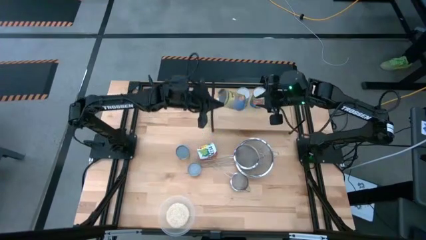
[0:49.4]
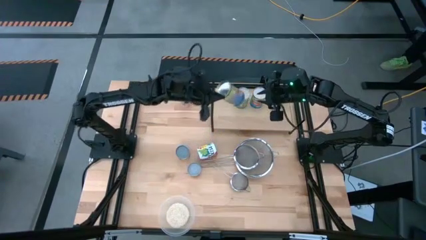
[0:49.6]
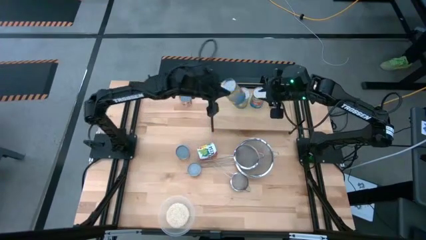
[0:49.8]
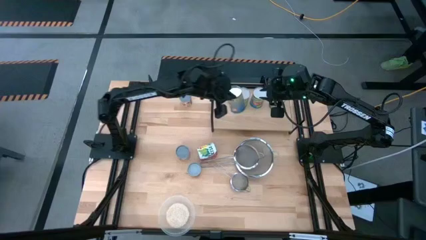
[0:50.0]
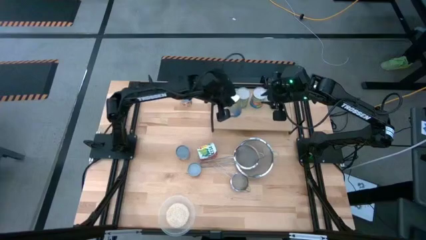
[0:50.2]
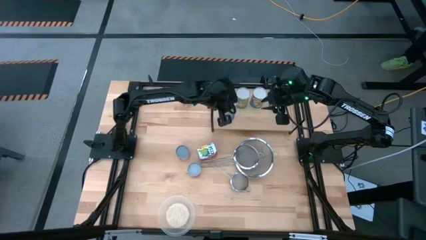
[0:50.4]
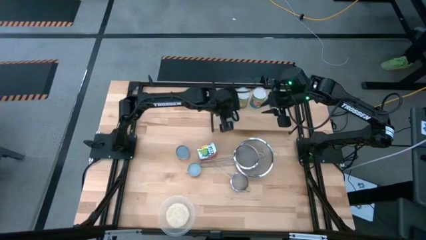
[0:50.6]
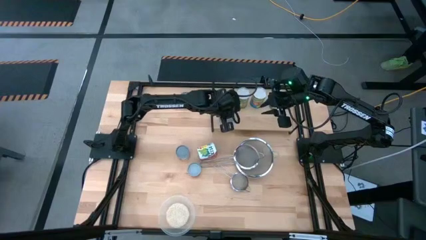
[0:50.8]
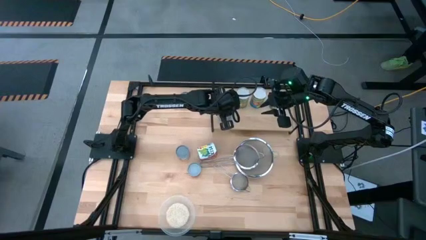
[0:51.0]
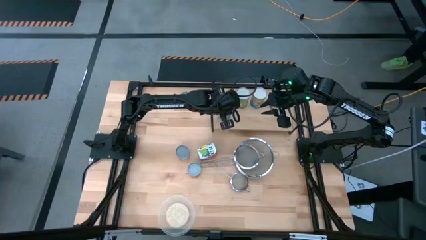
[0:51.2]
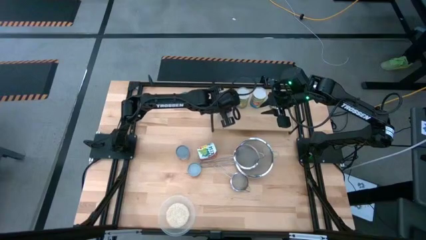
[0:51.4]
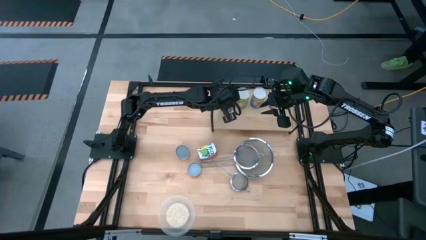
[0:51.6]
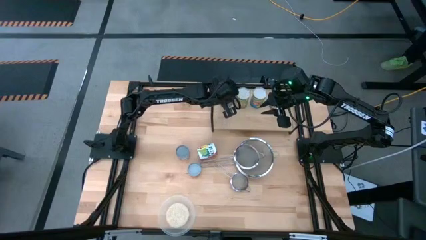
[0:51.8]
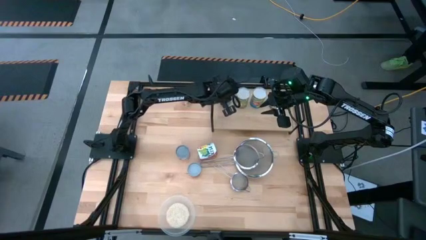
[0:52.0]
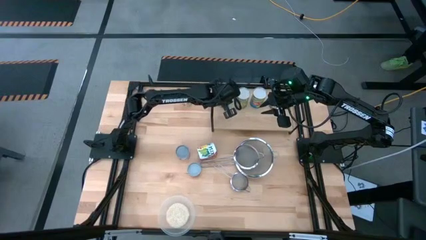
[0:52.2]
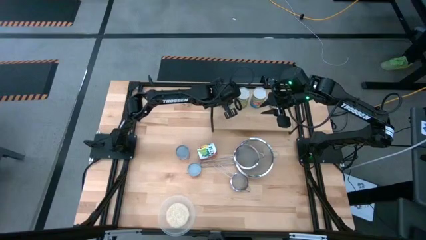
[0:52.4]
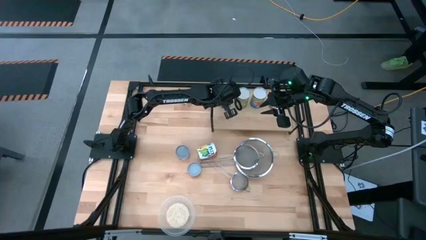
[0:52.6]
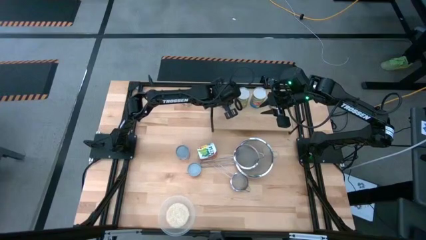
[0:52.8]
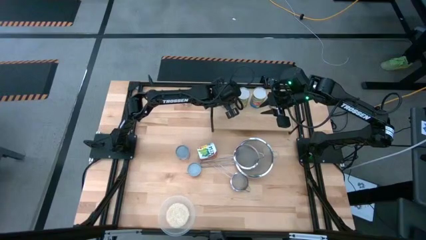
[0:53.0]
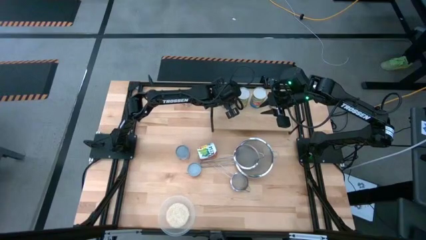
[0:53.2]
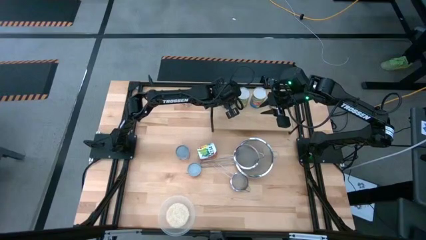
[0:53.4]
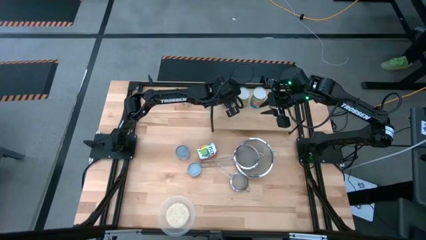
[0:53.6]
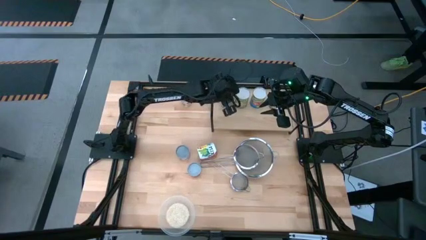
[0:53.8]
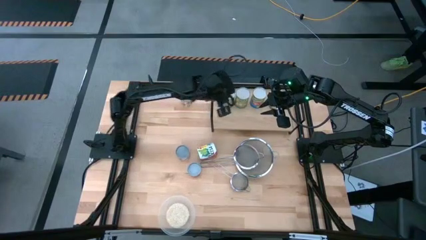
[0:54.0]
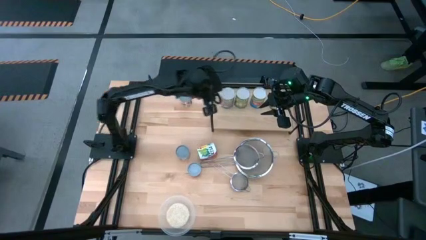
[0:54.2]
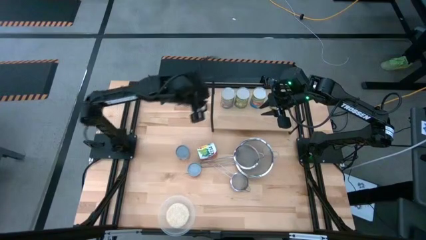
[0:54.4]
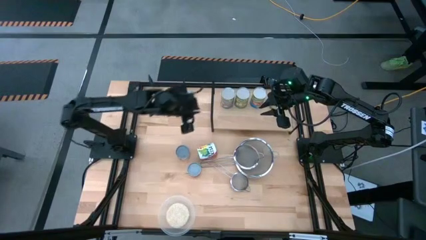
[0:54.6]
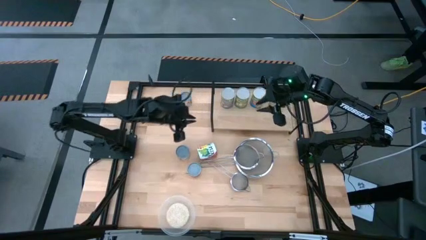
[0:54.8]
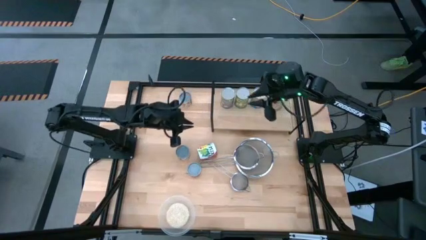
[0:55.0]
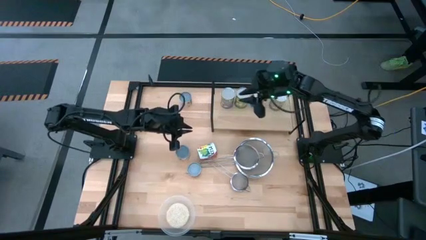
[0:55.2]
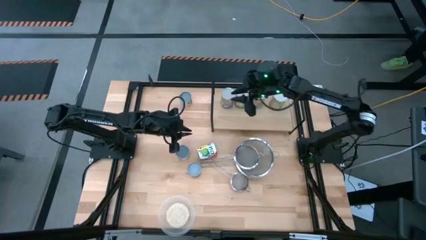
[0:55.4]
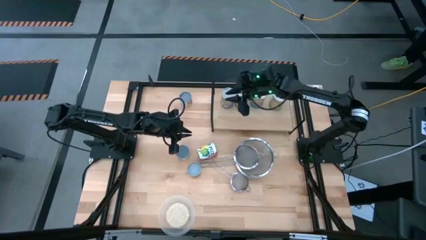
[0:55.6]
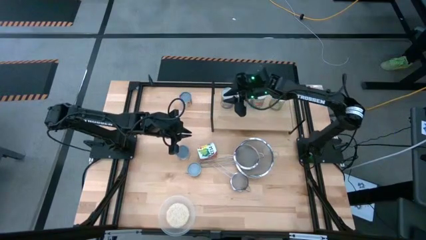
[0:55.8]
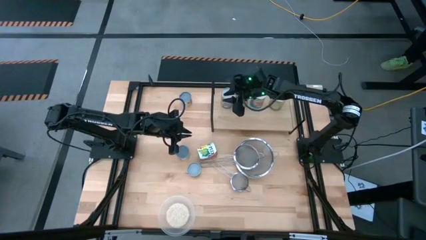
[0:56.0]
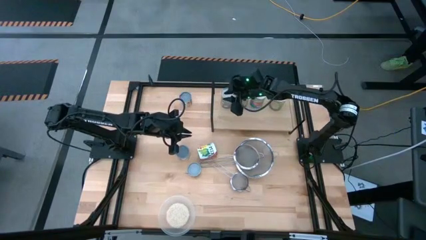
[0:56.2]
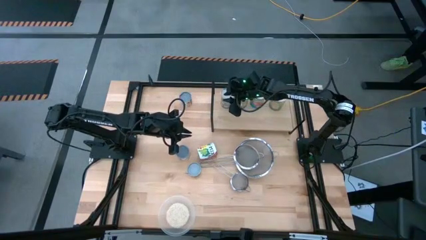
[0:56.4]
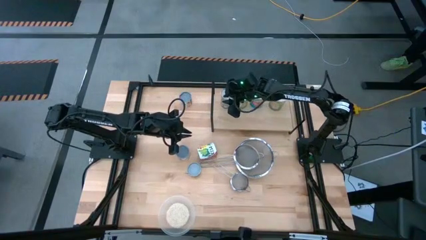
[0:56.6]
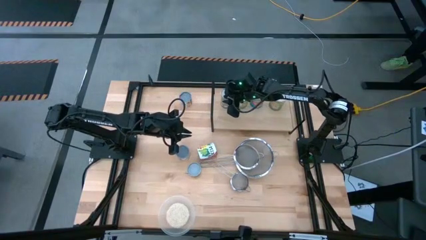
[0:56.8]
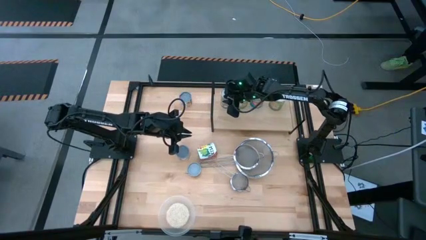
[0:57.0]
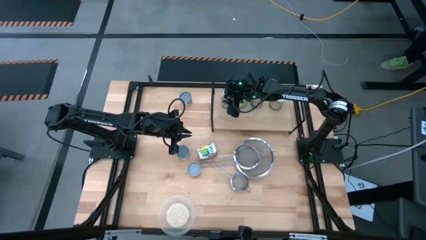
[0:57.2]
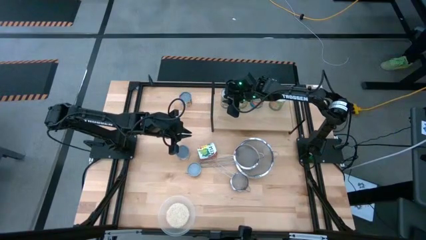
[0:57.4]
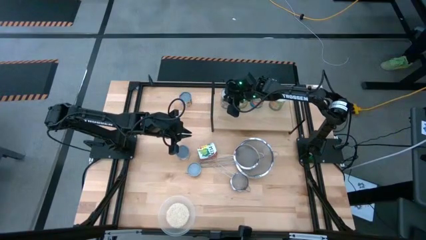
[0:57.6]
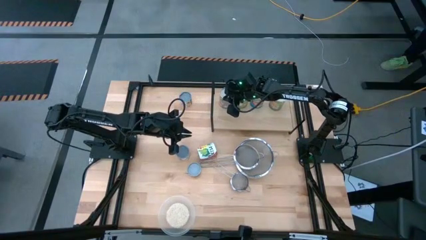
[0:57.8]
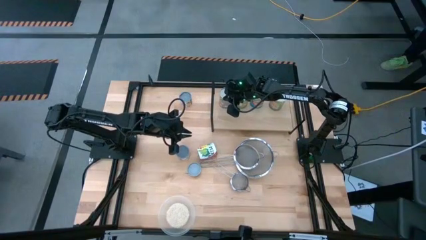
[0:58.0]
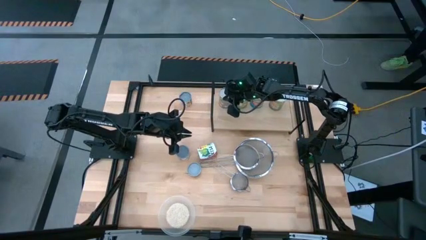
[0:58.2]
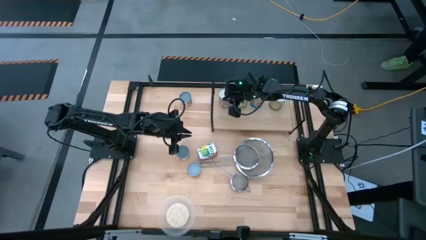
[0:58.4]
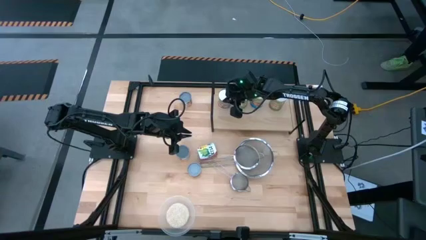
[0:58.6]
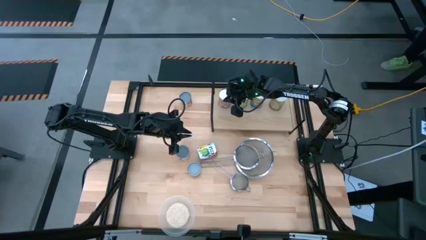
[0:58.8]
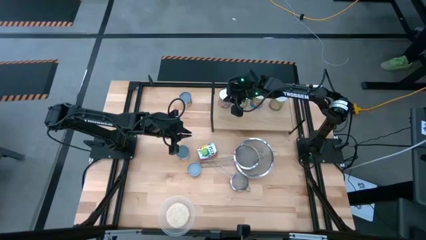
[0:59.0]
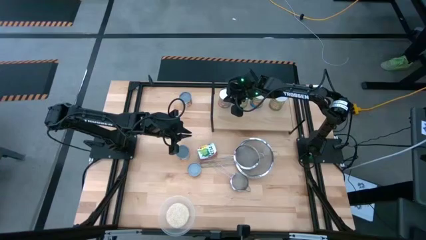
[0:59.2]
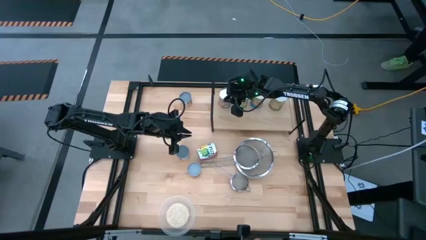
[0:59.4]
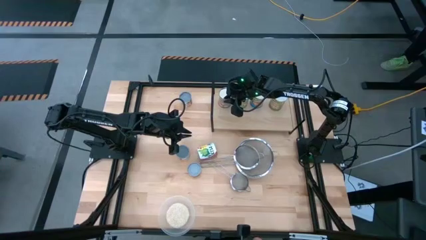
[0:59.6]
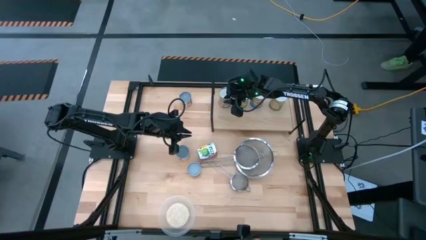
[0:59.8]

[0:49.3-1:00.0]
Task: Pick and place cans onto a shelf
Put the canned peaches on the shelf
